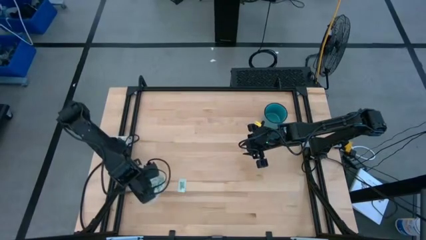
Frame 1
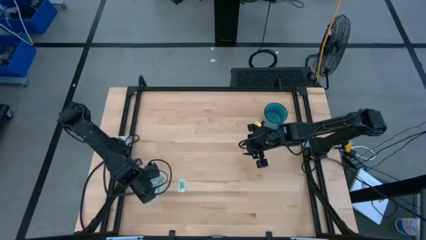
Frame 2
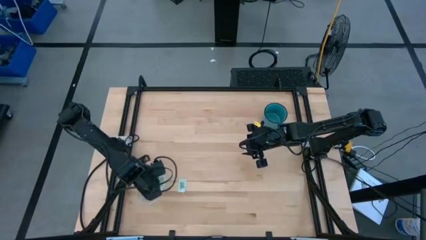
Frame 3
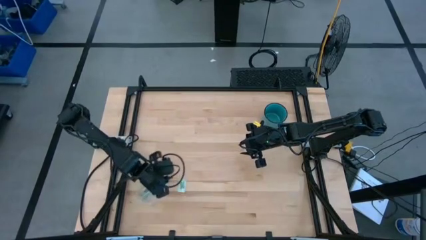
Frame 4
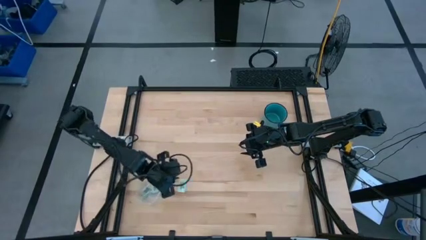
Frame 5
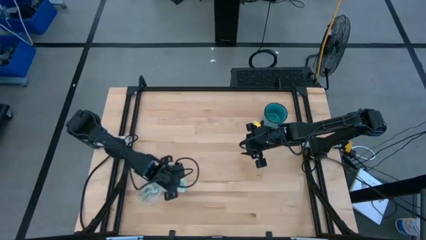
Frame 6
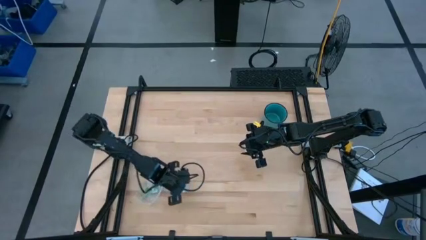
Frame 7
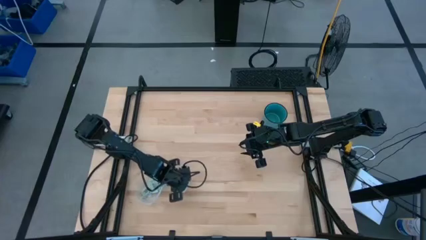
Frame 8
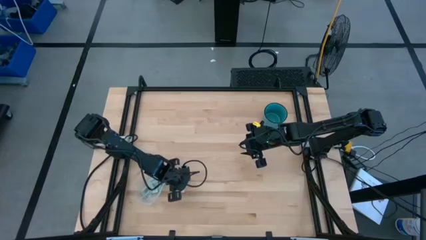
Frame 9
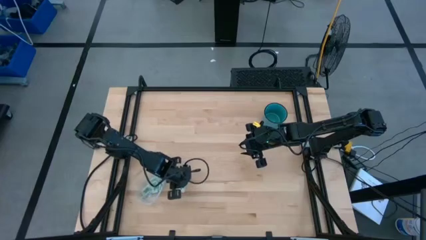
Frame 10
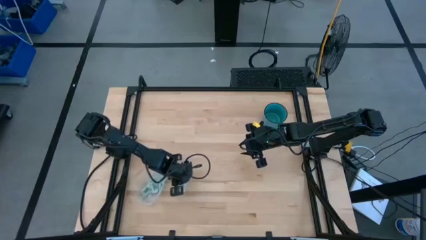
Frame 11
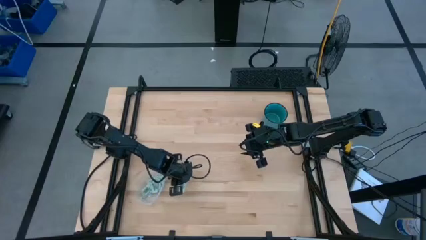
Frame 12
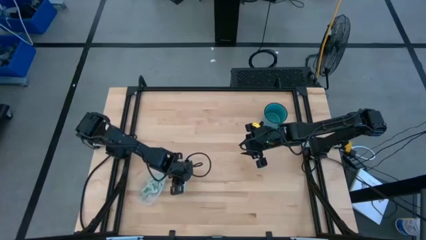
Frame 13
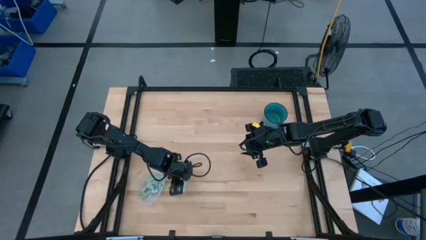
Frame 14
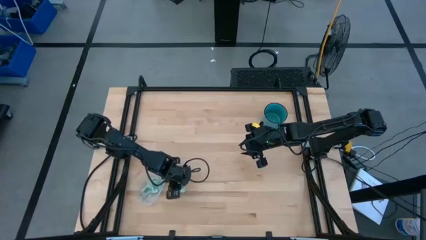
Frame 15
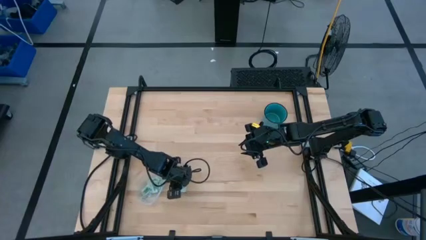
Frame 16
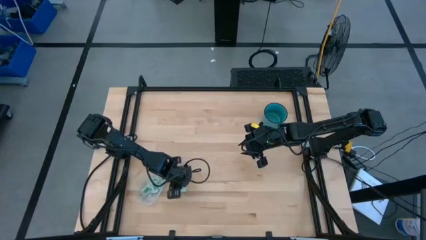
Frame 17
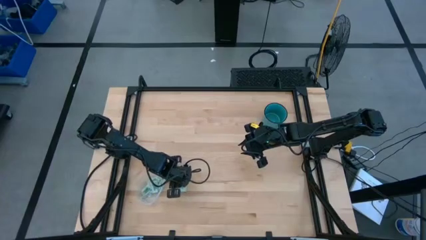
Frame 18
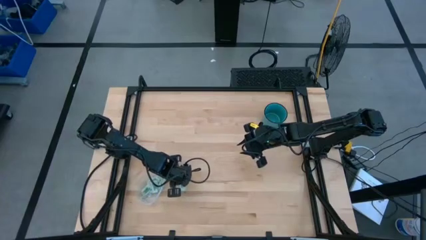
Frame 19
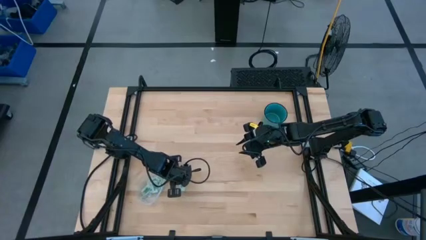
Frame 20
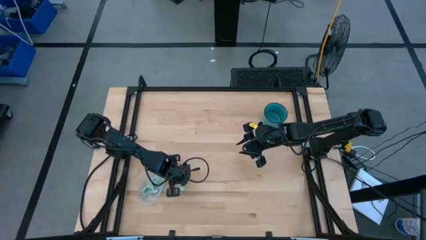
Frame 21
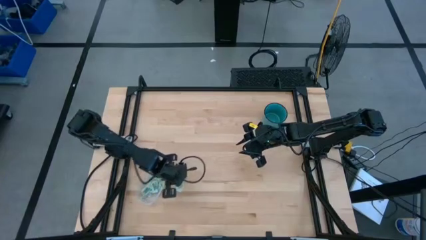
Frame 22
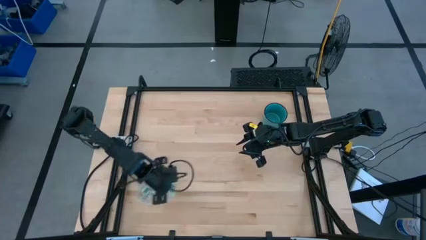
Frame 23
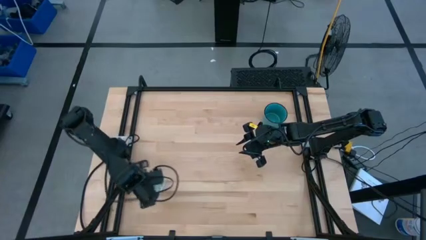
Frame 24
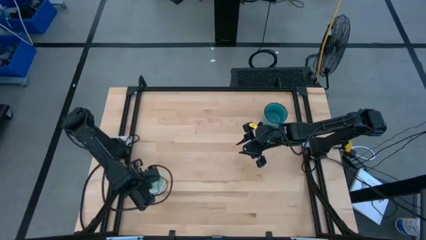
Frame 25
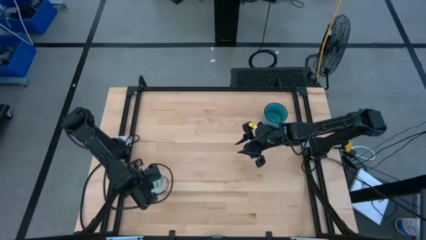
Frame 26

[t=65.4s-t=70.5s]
Task: Pick and place Stevia / Truvia into bins
Put the white stevia packet into the transparent bin

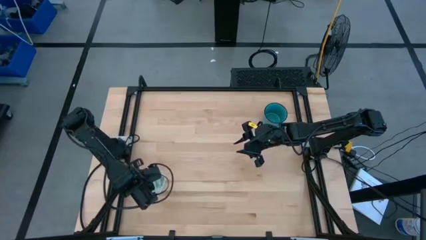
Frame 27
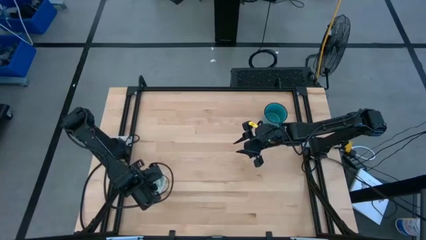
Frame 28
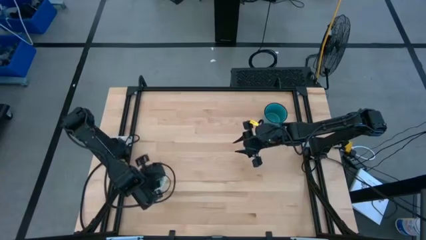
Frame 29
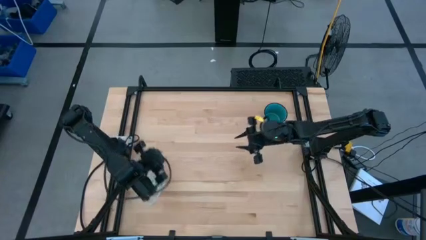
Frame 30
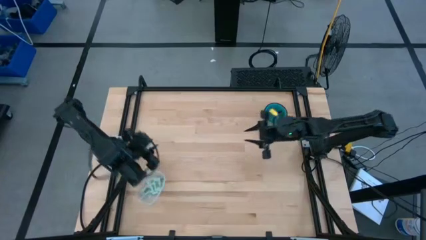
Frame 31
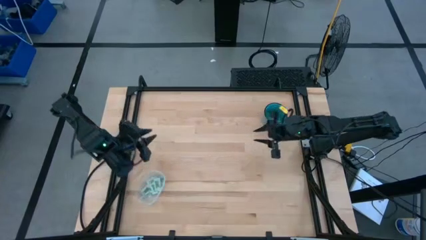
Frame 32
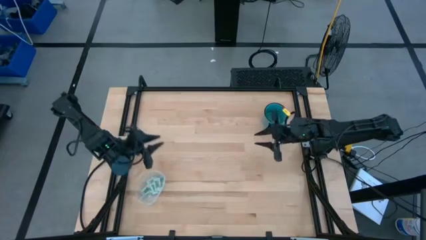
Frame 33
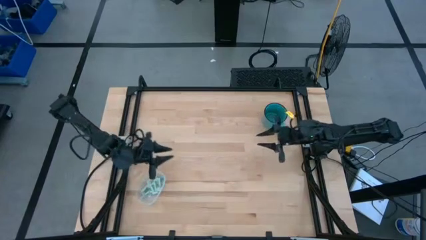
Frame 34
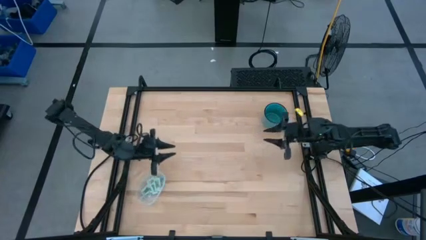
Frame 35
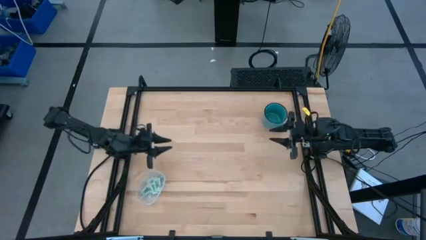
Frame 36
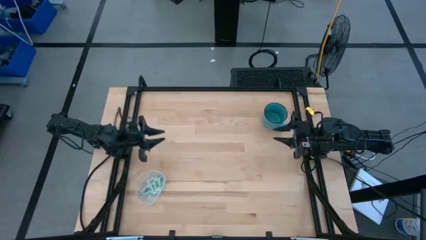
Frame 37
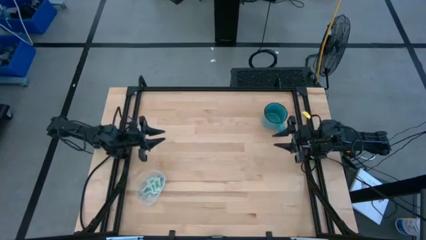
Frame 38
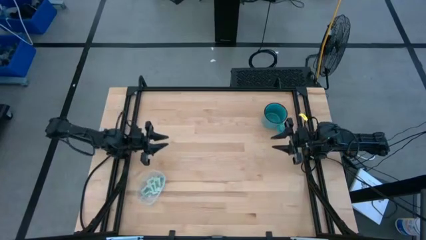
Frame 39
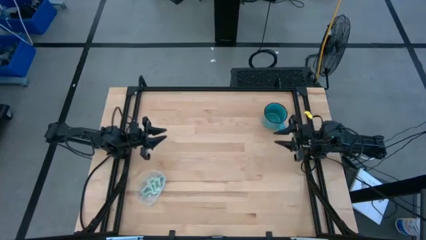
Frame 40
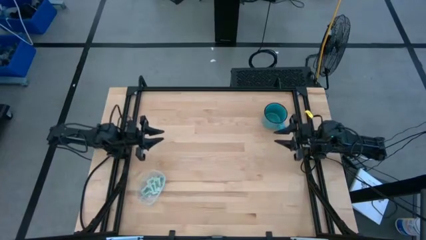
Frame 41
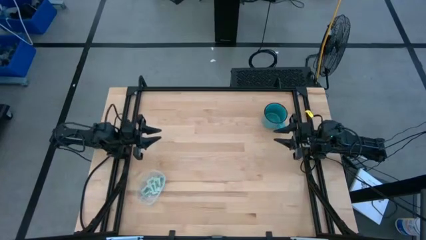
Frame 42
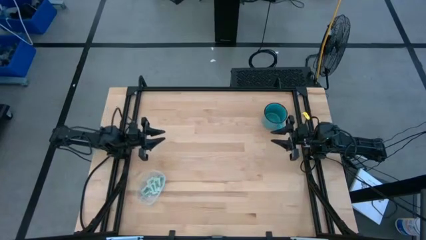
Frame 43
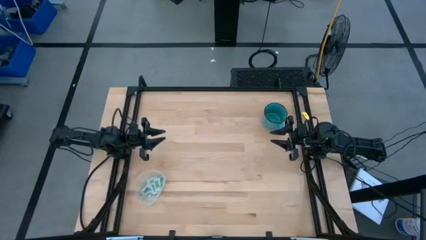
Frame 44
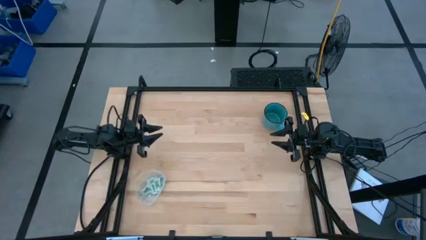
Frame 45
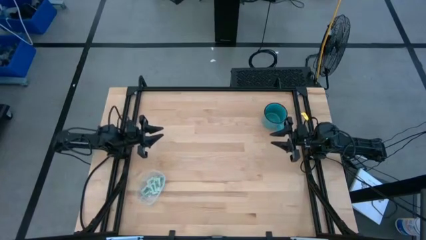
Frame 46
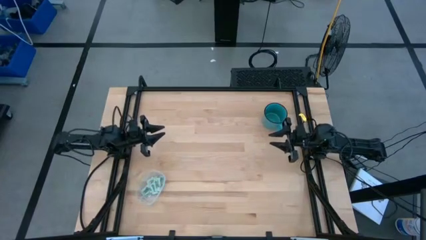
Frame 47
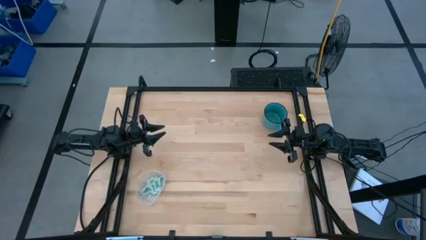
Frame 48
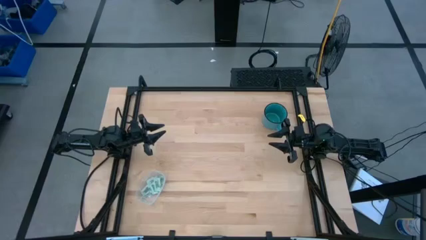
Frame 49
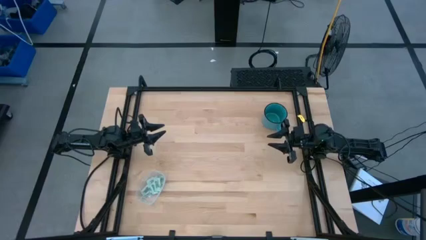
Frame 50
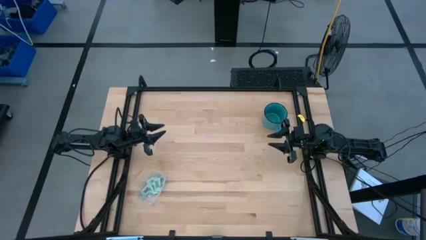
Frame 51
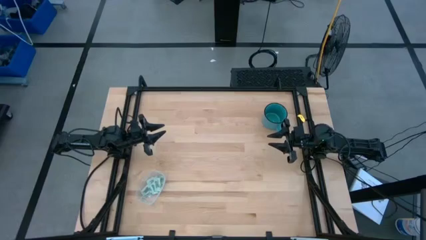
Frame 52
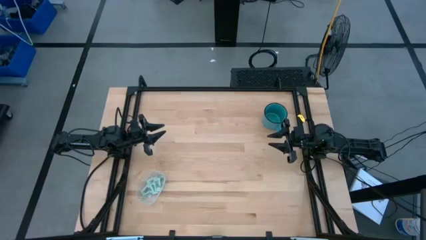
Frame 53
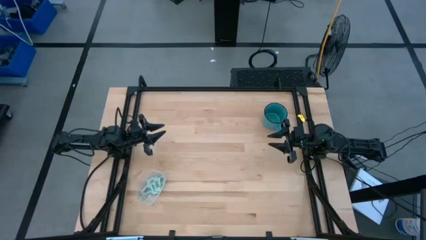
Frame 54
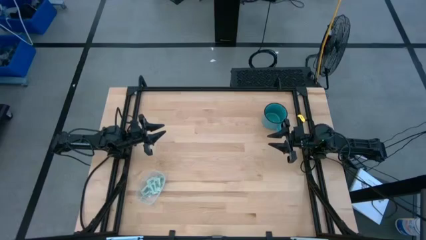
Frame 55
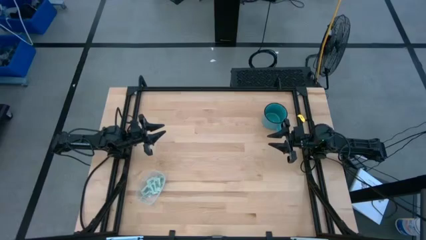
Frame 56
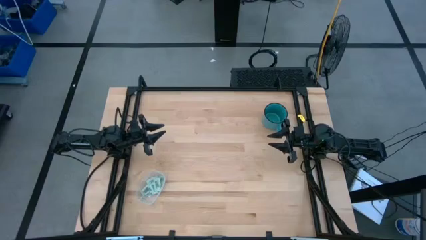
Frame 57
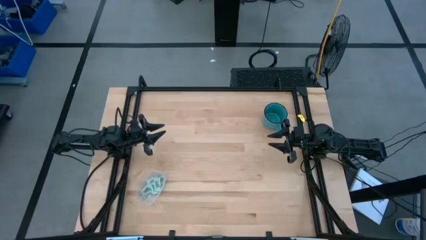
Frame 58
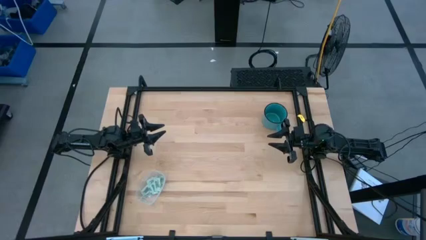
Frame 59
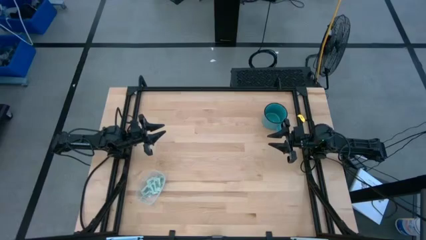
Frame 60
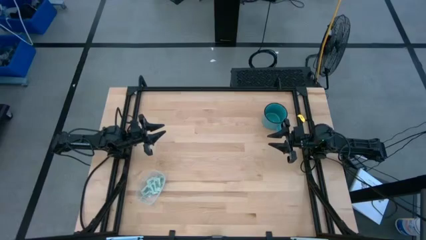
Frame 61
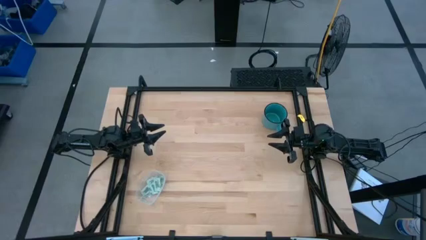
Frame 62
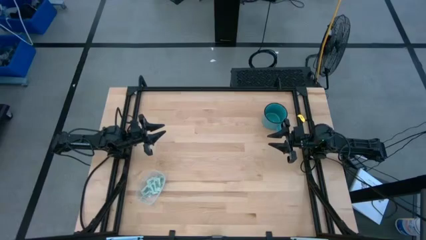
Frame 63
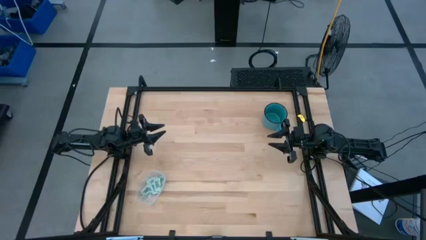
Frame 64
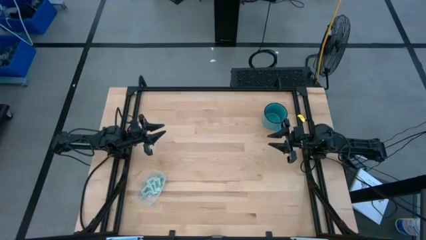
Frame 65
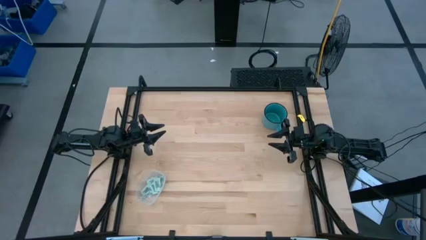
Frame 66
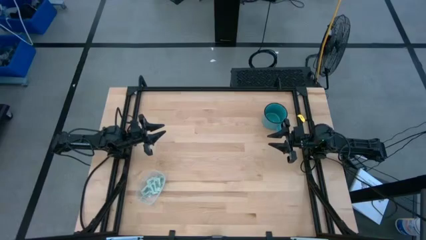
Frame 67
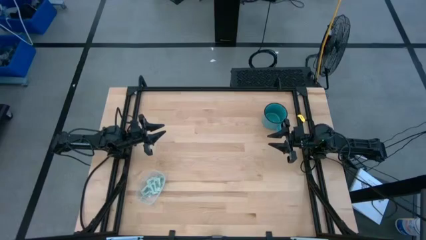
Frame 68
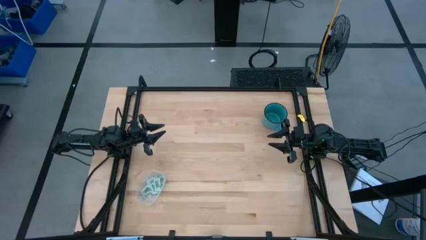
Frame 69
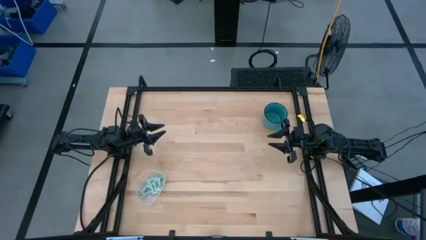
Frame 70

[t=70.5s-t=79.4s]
Return to Home Position

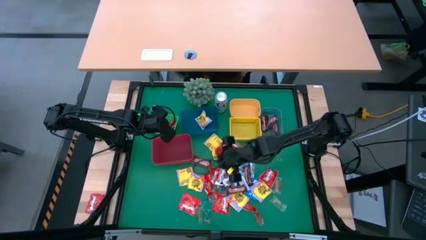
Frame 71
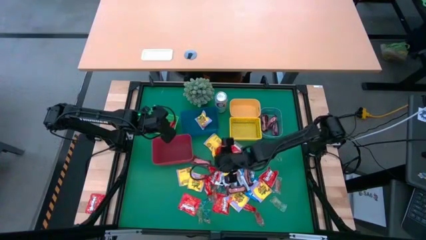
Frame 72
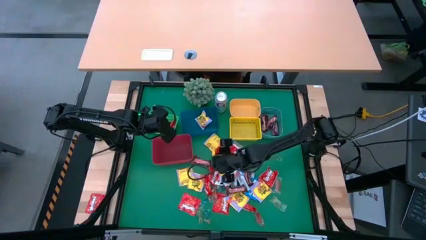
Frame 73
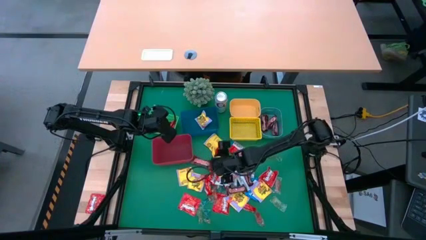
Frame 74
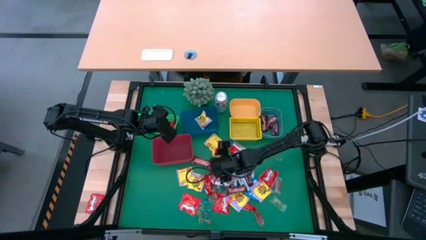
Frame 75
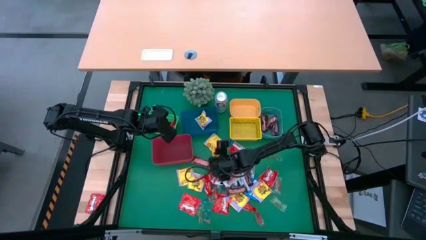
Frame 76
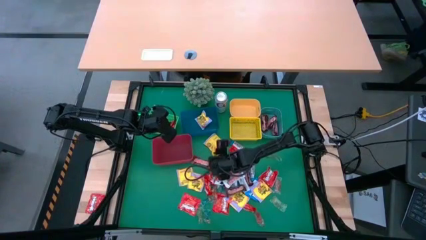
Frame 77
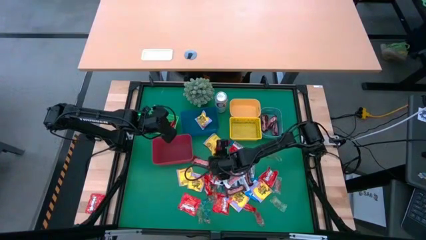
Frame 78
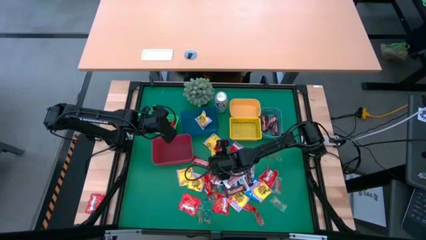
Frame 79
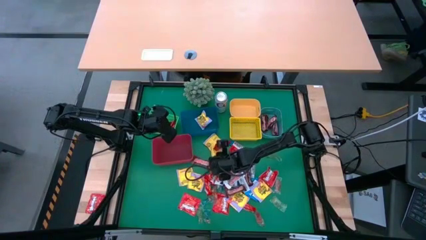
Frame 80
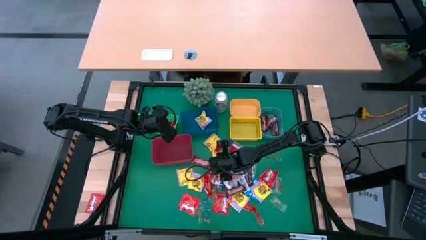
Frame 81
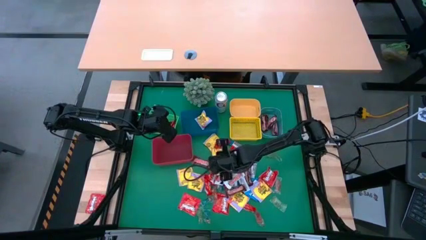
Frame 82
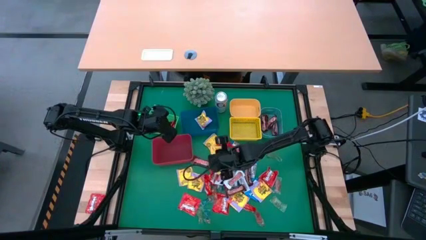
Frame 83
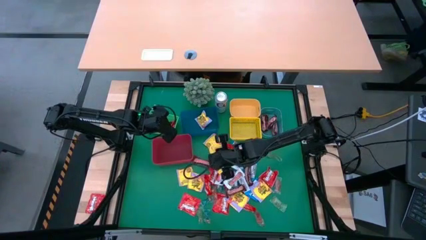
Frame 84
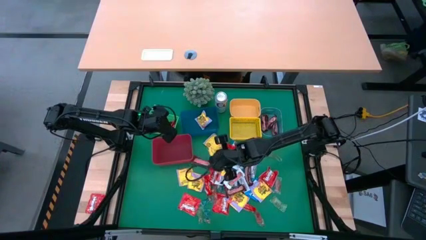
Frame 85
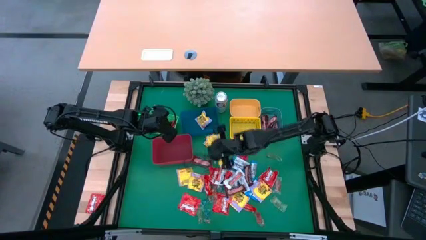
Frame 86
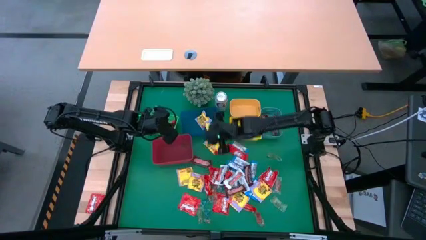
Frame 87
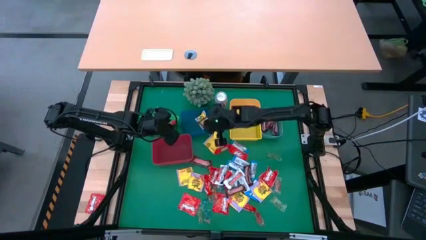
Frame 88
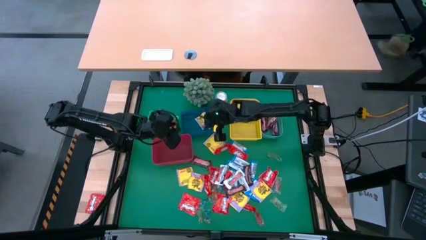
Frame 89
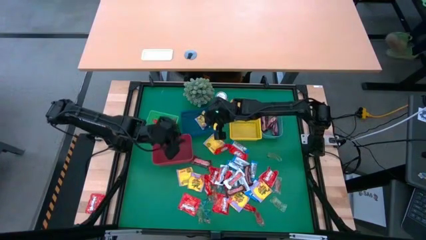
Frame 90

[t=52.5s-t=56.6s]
Task: Sort candy
Put the yellow candy pack into the blue bin
